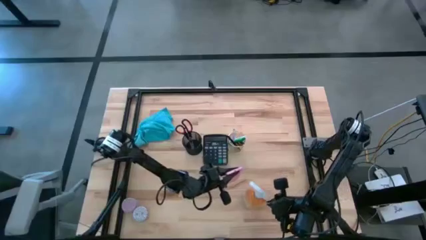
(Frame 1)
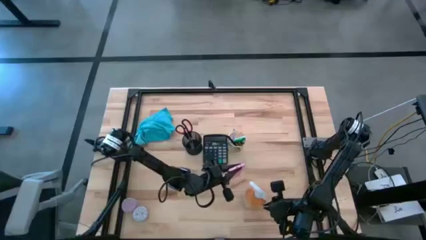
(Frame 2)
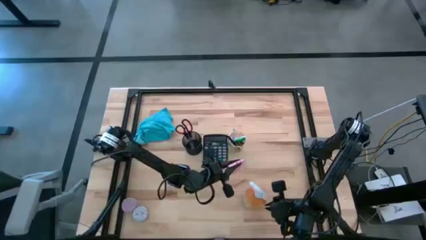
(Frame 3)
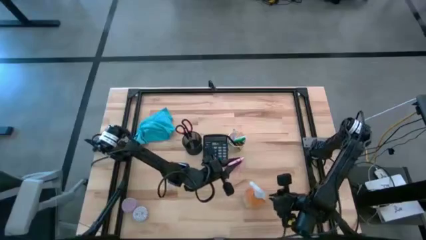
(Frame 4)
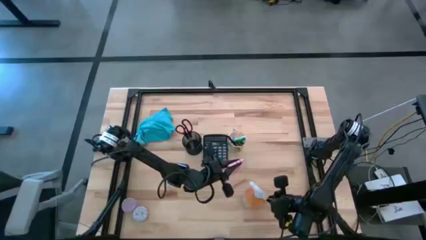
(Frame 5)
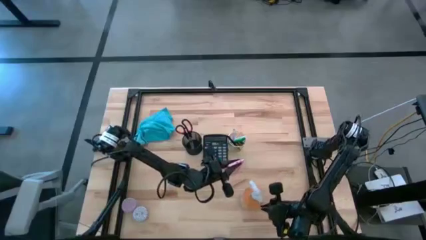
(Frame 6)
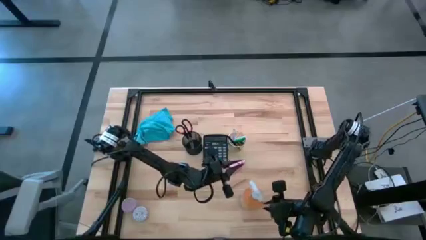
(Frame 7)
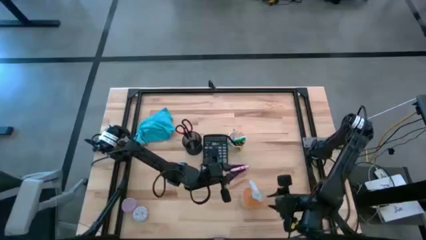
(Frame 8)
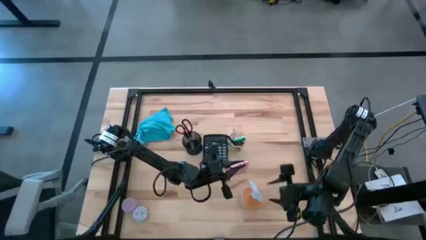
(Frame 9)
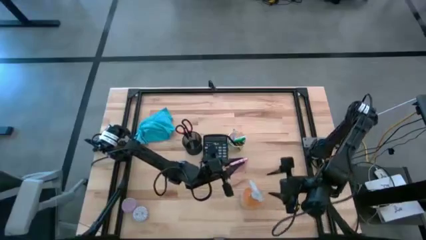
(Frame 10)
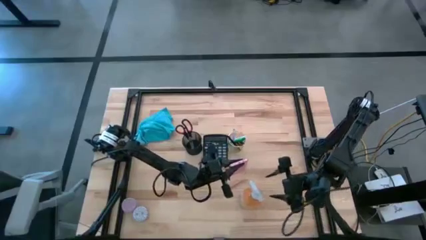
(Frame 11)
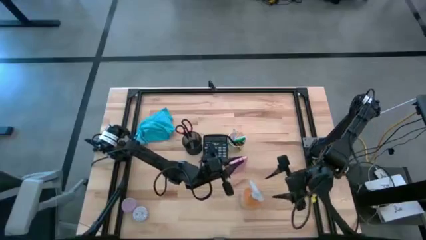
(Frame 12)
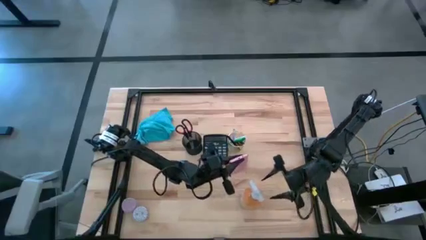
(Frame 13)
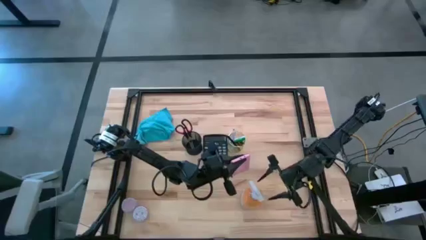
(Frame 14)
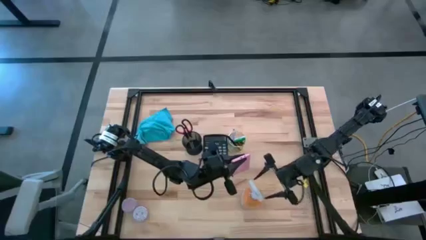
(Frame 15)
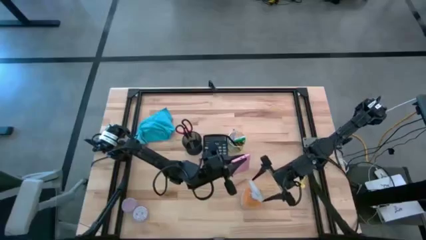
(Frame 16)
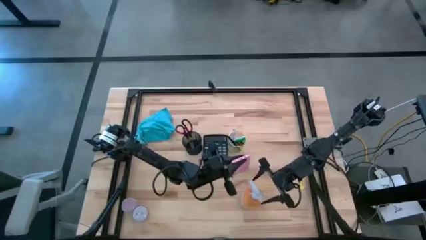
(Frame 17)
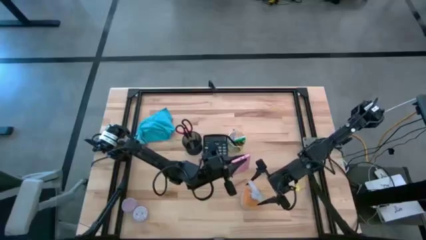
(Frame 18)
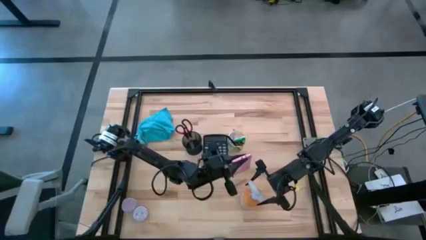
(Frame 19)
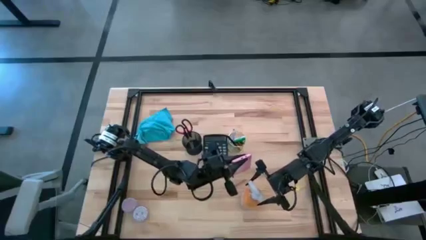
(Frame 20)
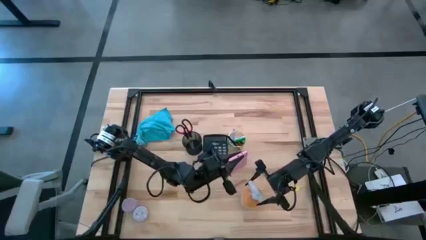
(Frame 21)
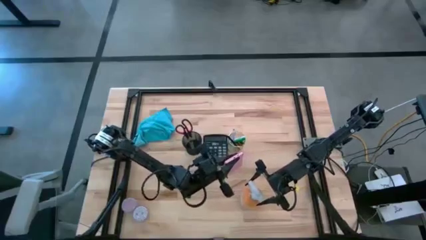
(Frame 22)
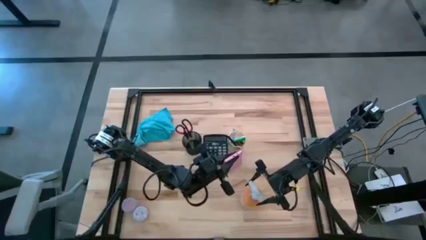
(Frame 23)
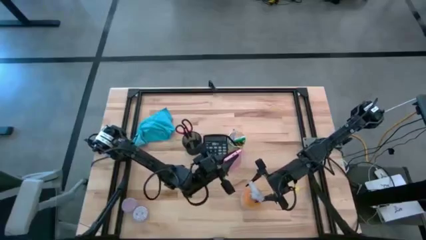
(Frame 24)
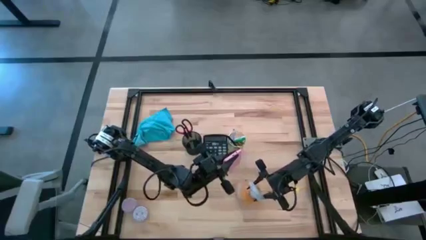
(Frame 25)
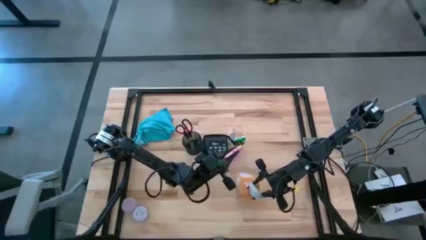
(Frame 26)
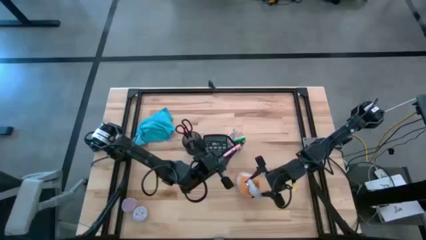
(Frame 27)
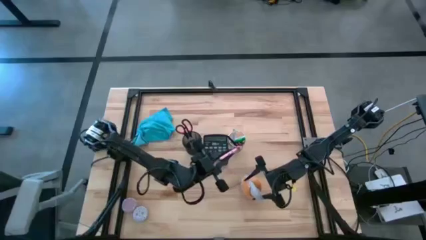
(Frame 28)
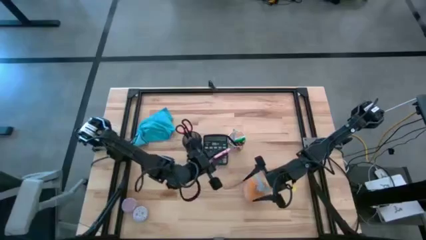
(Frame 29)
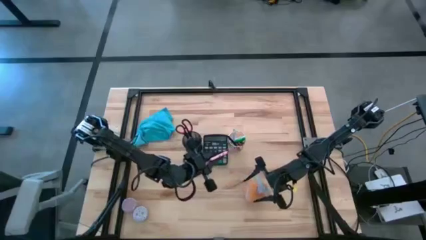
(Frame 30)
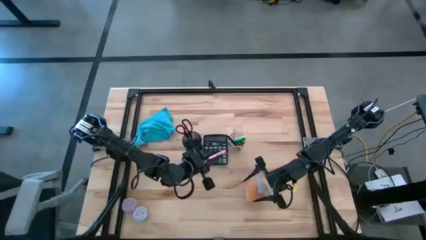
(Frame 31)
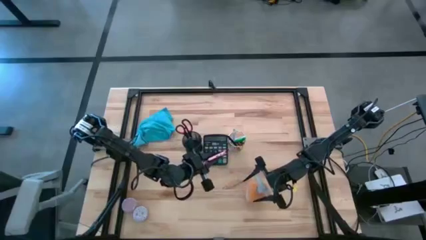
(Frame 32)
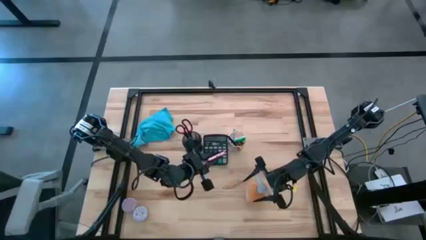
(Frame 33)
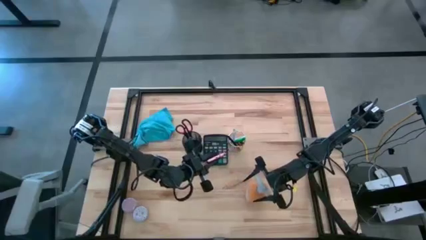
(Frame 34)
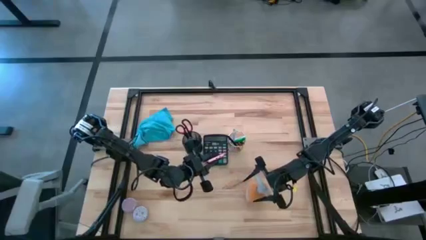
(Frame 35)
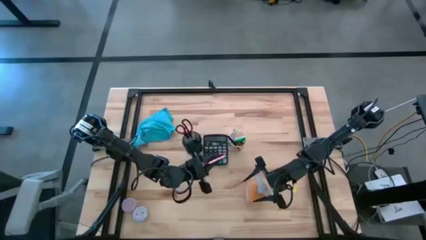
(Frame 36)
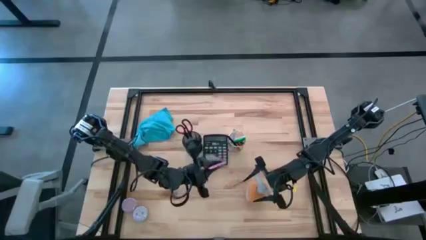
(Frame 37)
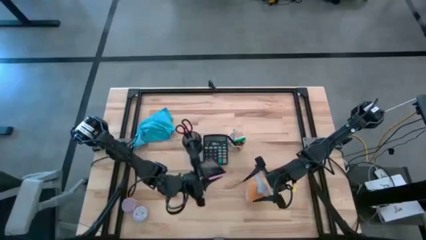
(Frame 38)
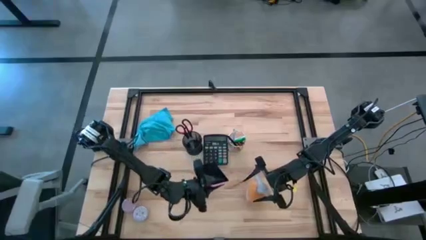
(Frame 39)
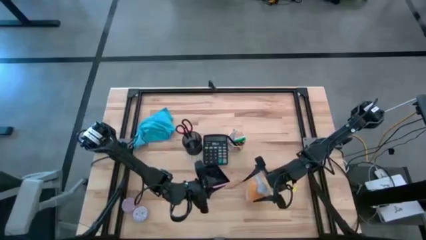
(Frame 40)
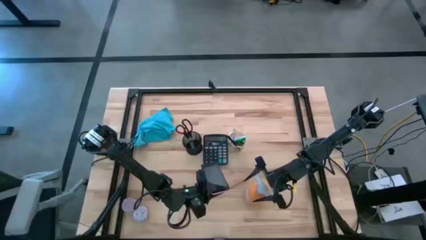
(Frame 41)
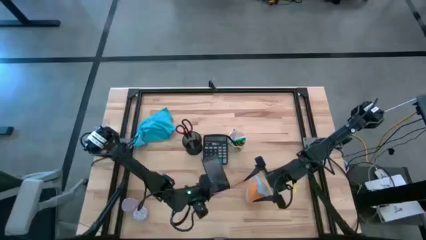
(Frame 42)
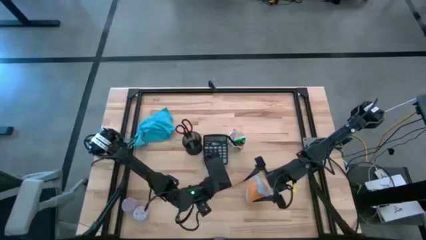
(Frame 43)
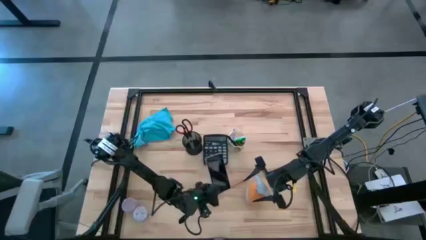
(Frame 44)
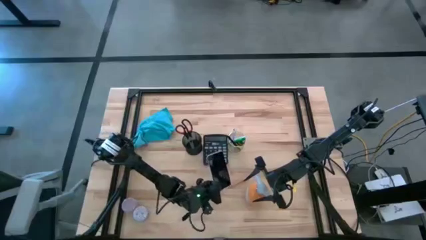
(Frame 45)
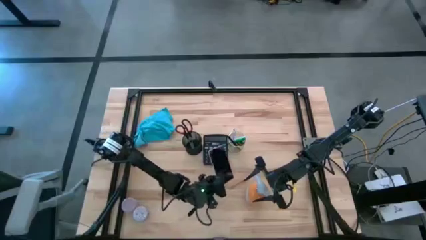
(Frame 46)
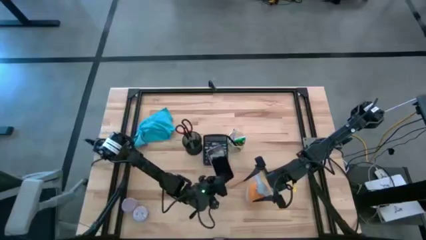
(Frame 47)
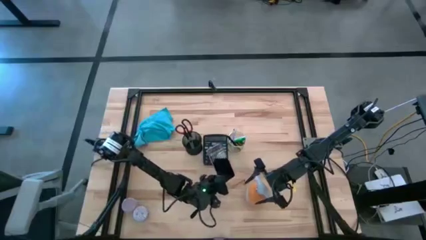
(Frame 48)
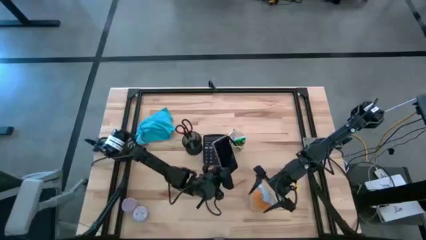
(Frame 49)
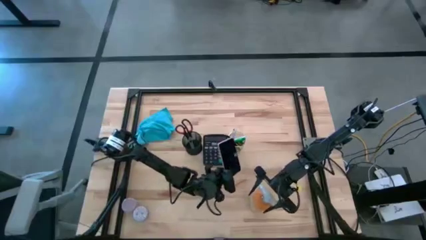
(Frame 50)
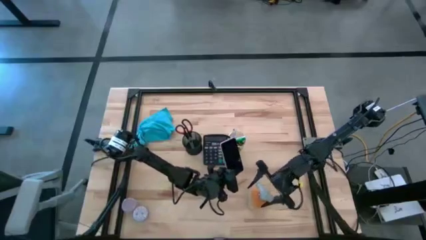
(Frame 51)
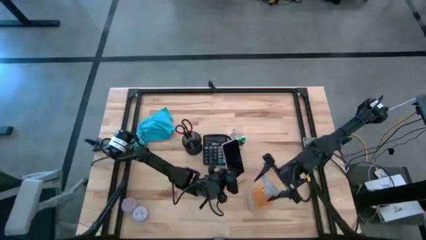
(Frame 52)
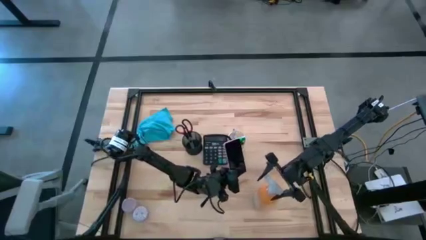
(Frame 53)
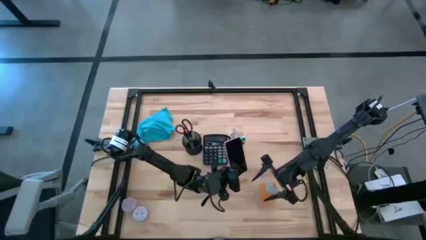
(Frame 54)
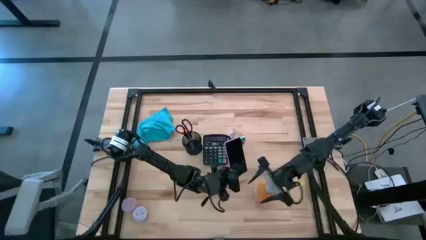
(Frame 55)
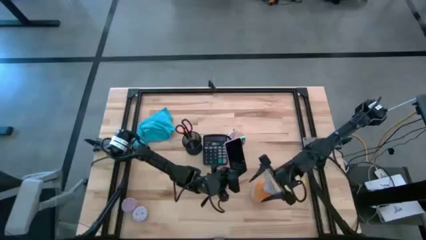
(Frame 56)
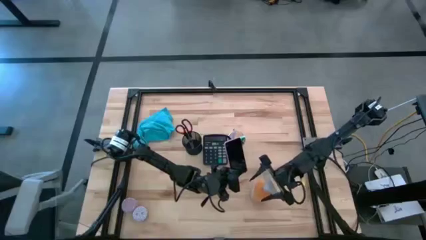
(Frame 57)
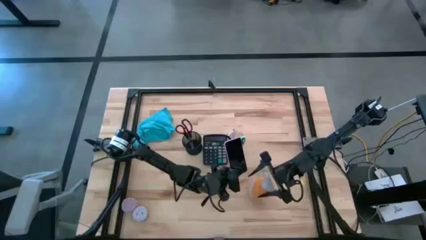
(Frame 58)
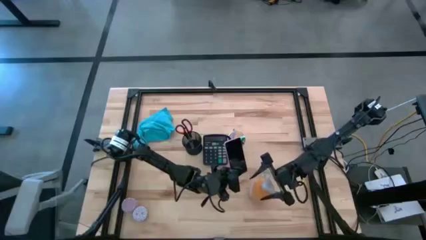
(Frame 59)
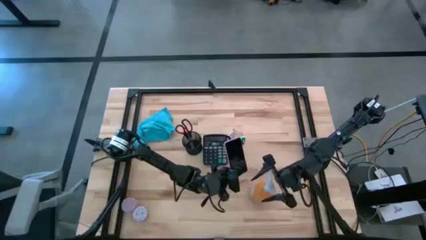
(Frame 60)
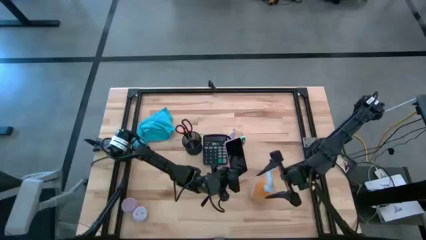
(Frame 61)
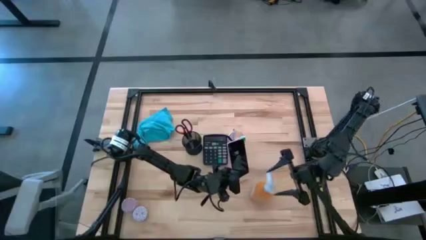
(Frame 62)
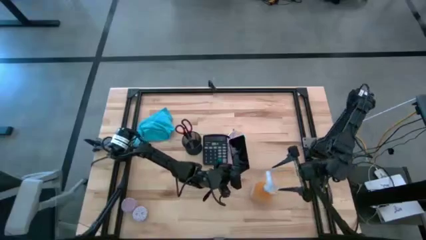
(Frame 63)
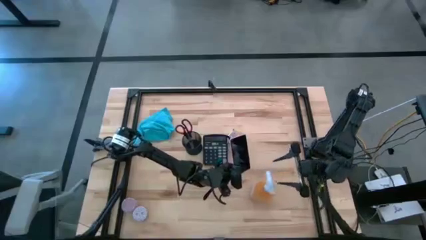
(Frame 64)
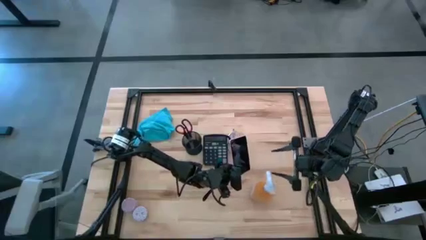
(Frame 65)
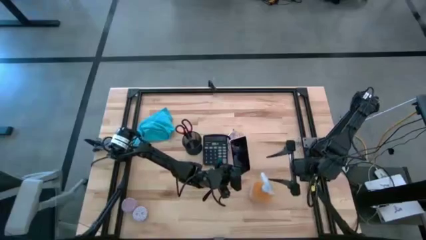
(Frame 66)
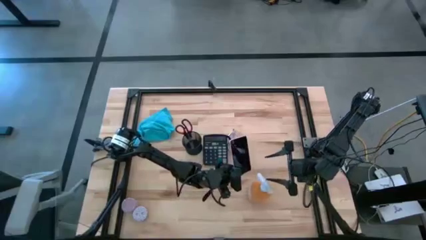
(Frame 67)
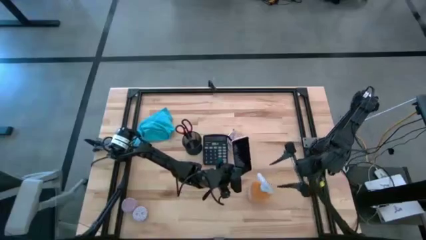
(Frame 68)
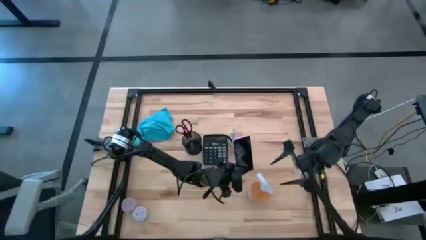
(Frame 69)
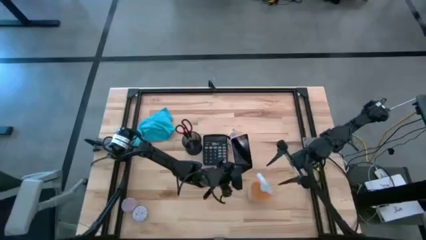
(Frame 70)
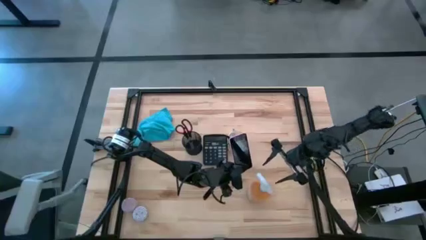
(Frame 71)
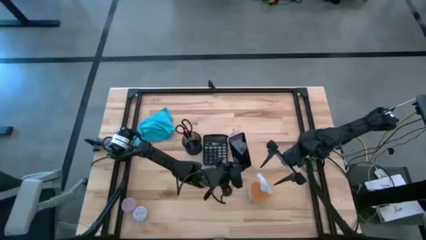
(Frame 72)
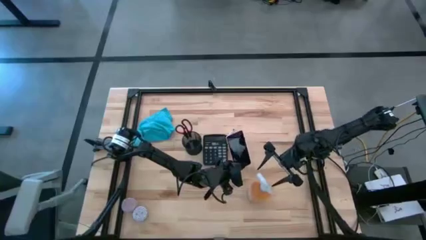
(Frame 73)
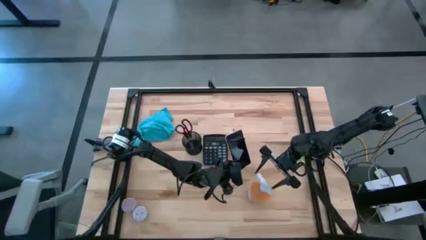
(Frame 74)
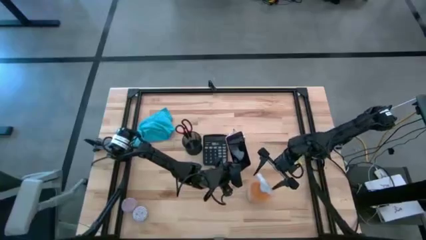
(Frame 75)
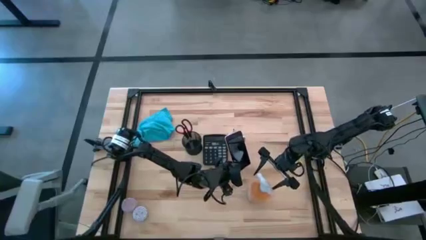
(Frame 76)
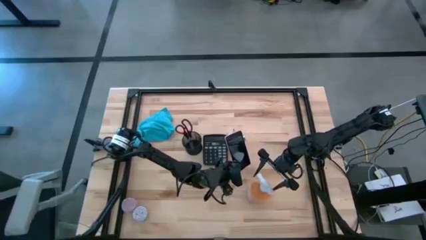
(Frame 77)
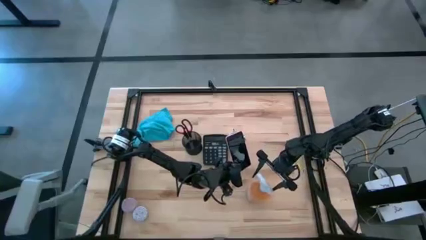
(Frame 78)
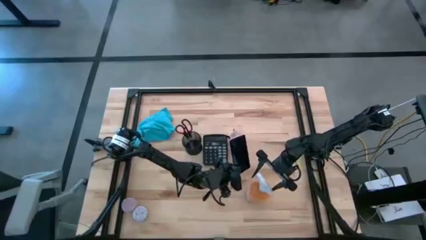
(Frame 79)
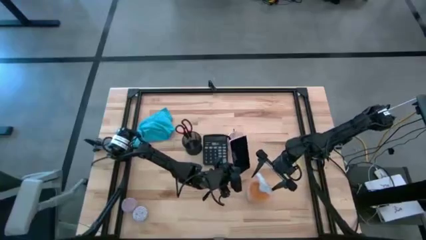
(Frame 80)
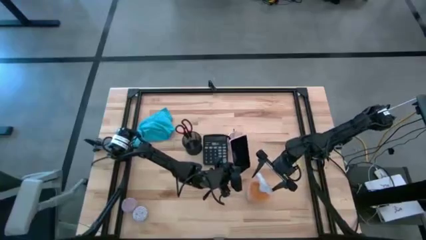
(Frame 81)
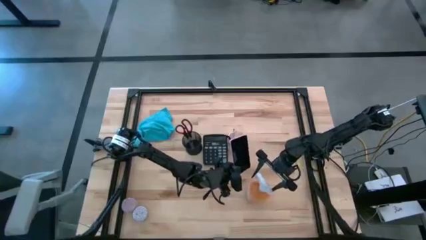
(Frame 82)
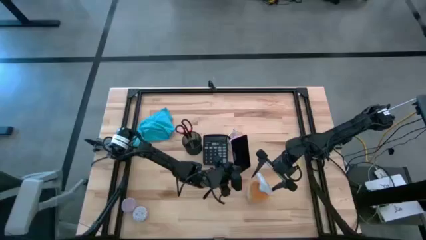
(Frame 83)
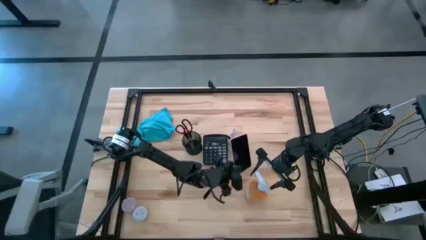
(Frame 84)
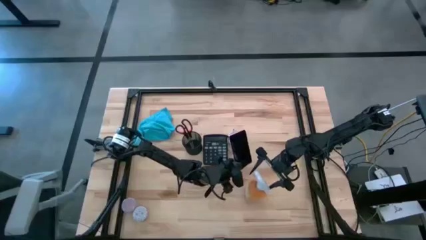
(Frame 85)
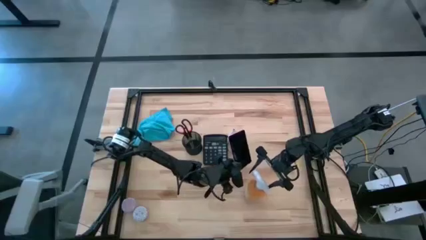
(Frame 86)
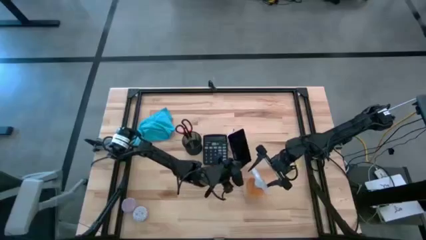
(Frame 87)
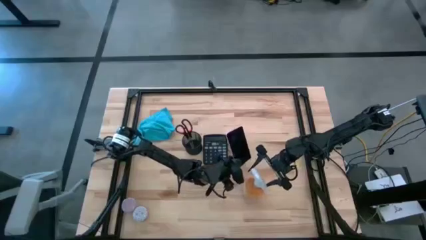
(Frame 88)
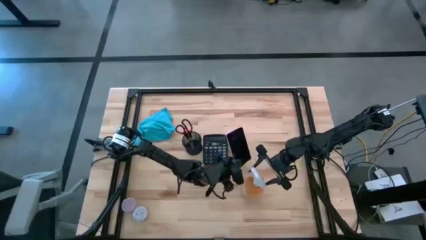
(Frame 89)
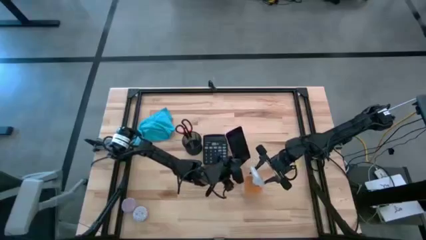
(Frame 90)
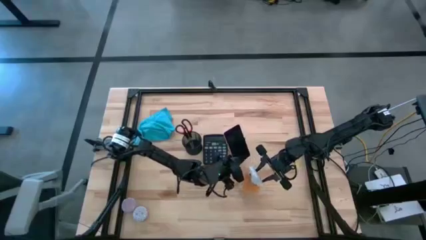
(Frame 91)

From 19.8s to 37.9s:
Task: Apply microfiber cloth
Spray the back and front of the cellphone with the orange spray bottle
